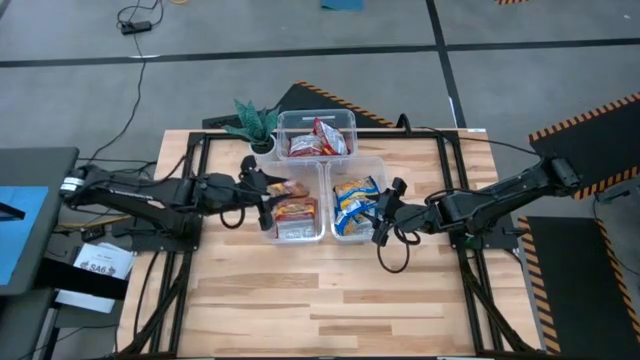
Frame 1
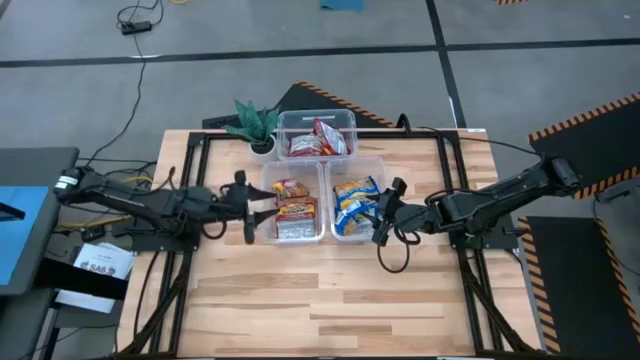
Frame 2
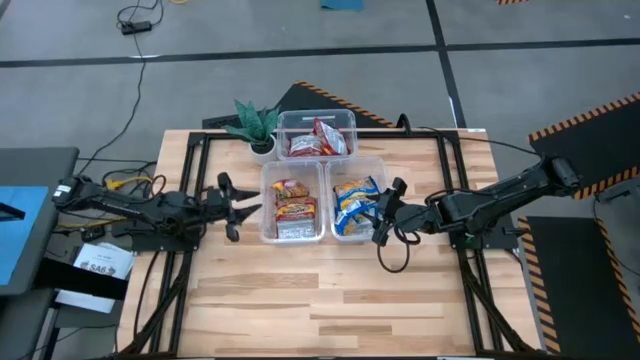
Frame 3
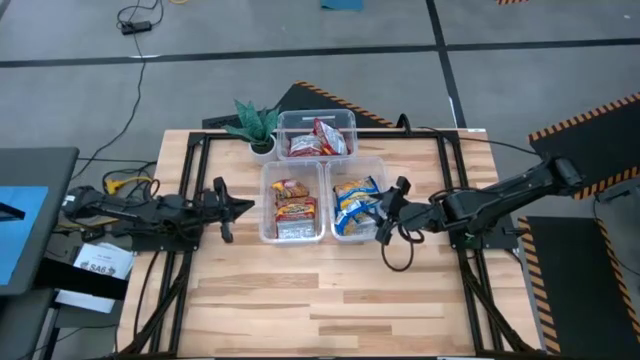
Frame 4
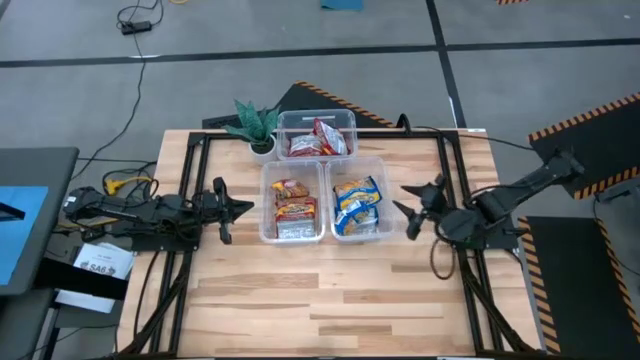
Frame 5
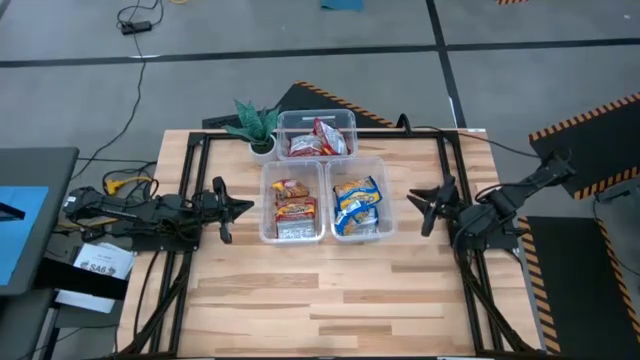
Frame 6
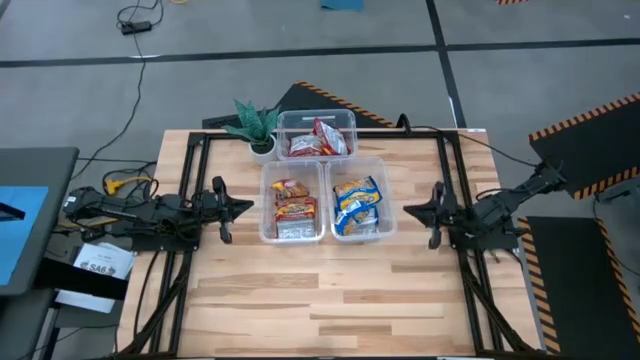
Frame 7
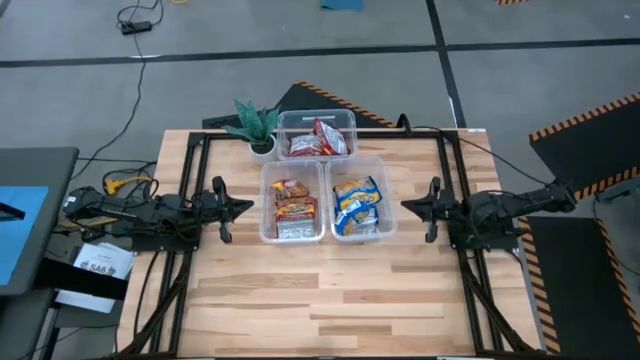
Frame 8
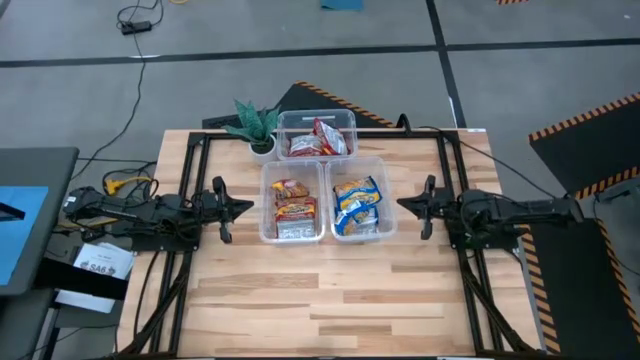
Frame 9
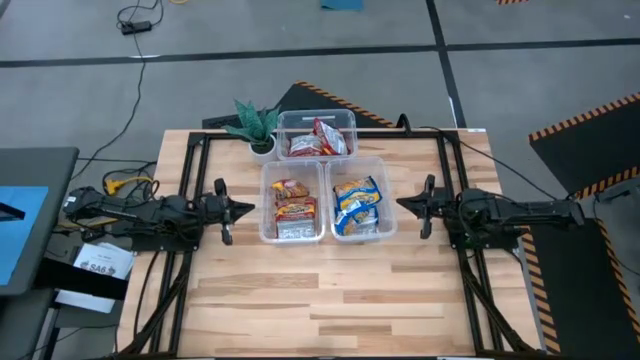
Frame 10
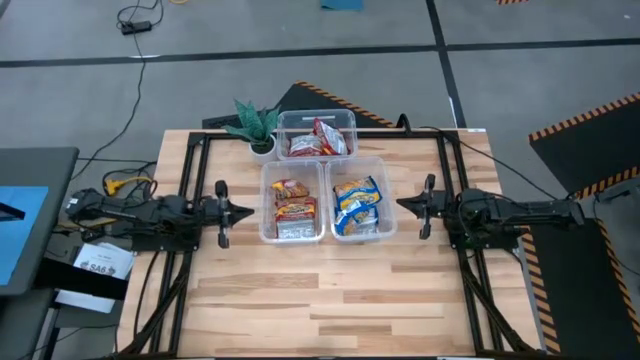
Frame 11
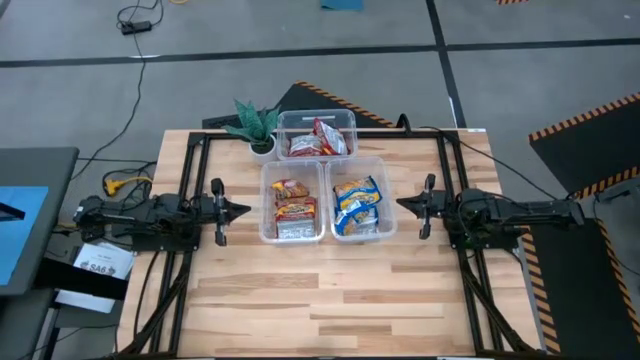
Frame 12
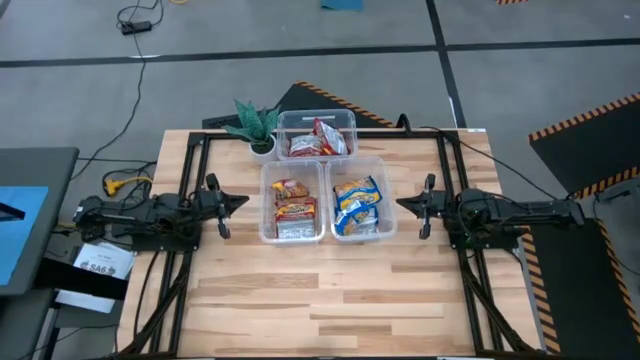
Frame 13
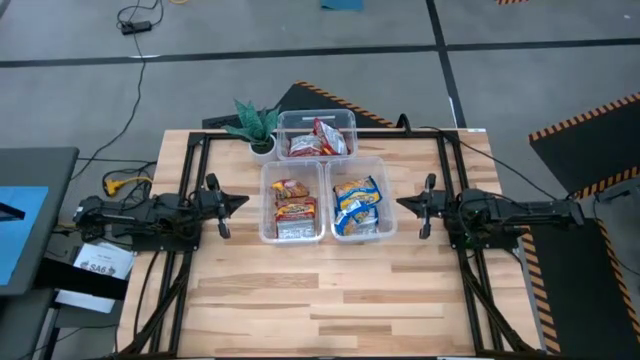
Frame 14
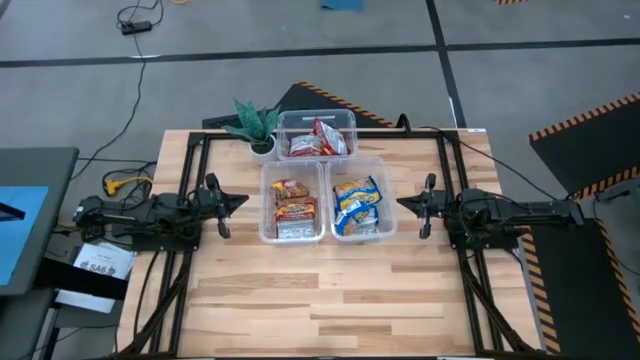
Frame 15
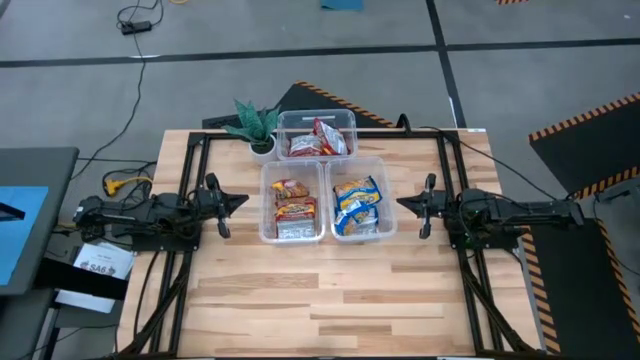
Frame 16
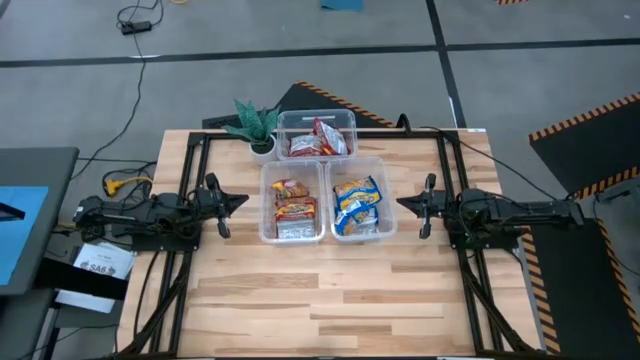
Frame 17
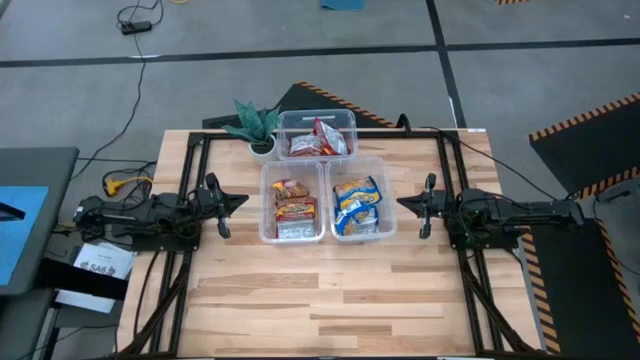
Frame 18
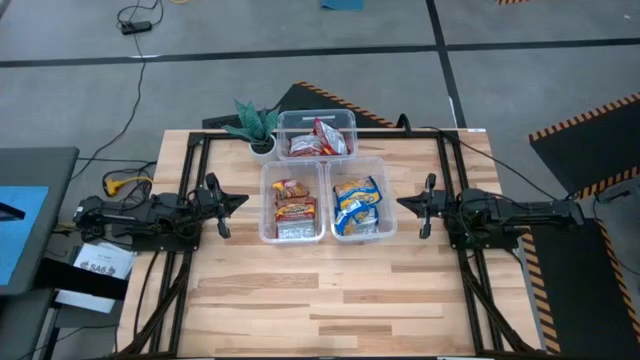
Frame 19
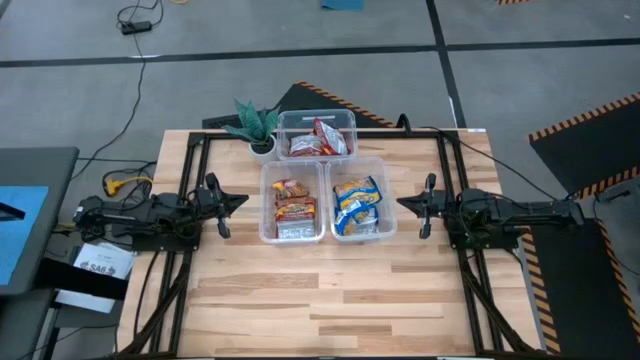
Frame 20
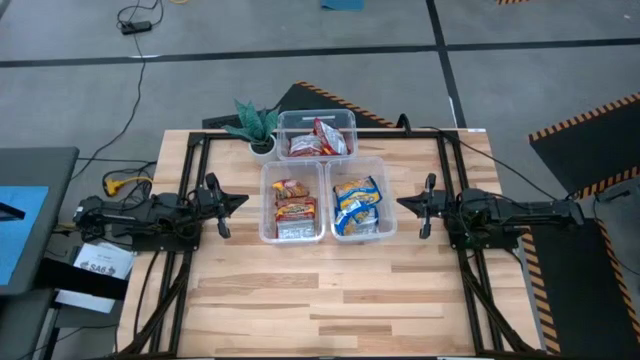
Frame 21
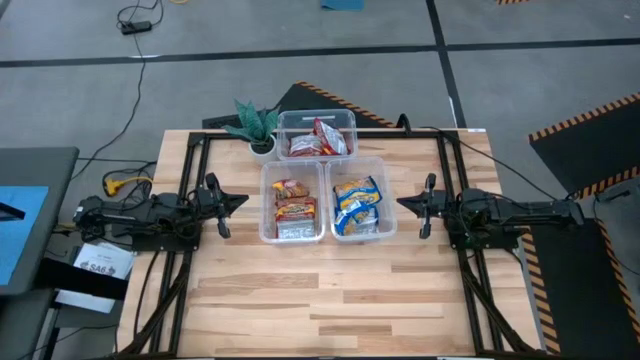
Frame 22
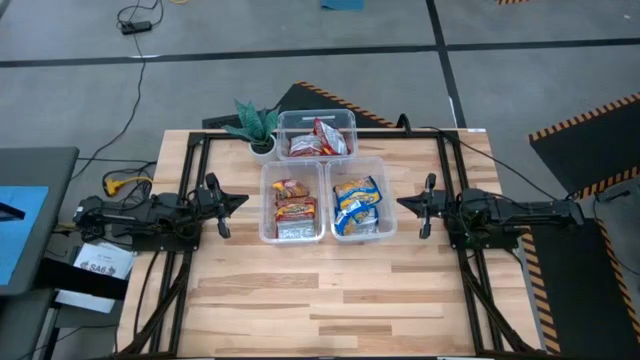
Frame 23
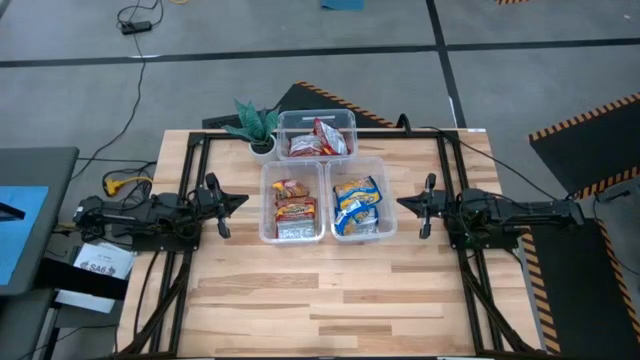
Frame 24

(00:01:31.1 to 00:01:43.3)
Task: Sort Maruchan noodles
Return to Home Position

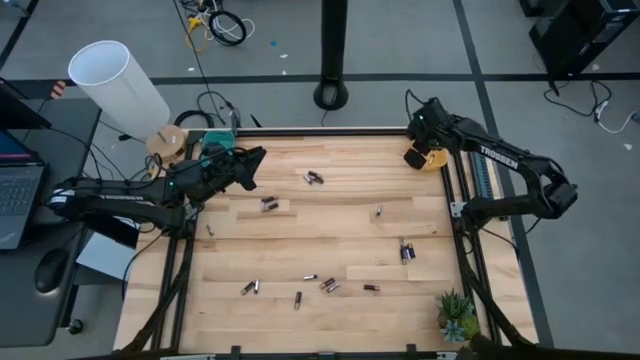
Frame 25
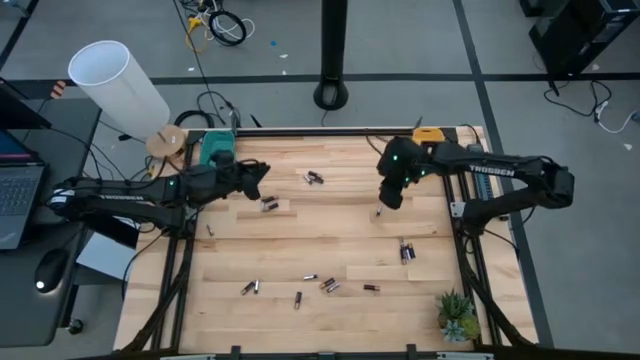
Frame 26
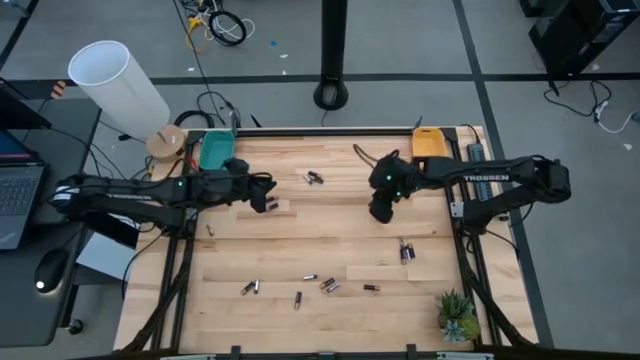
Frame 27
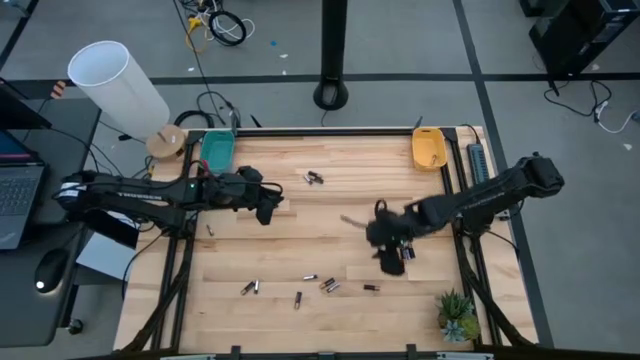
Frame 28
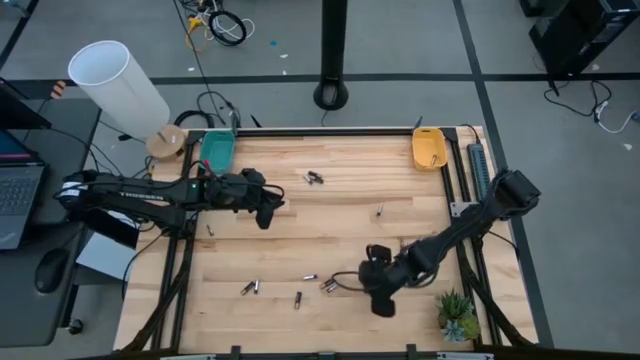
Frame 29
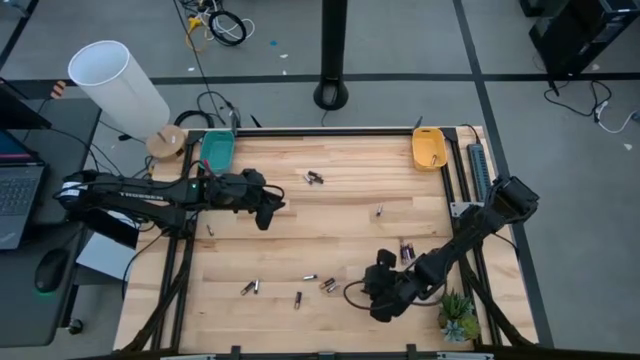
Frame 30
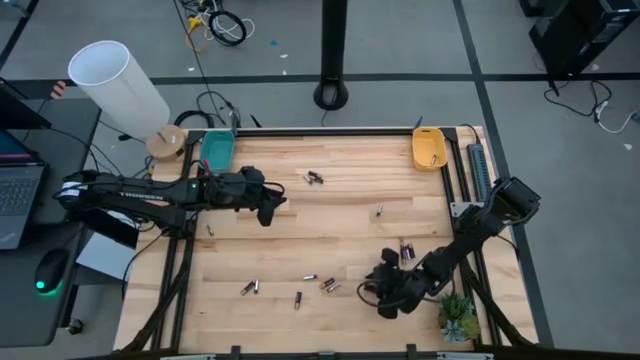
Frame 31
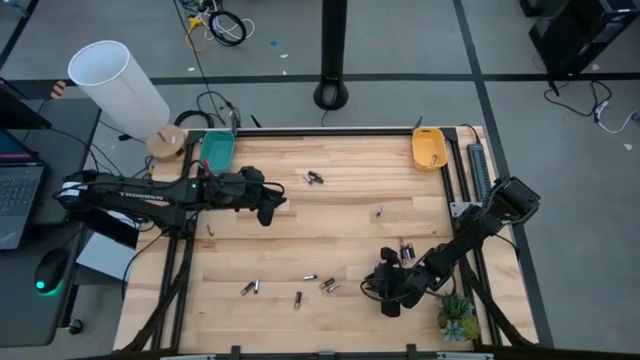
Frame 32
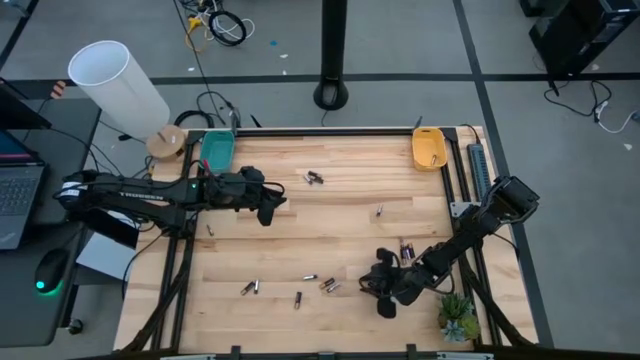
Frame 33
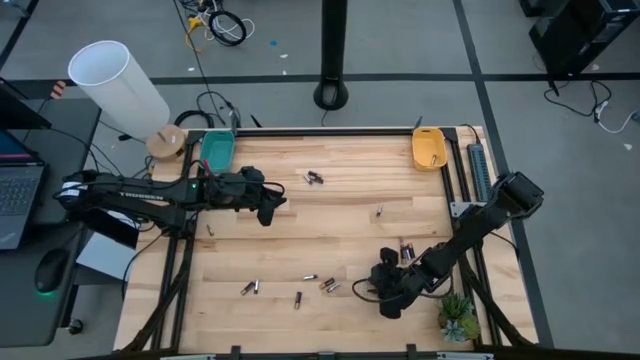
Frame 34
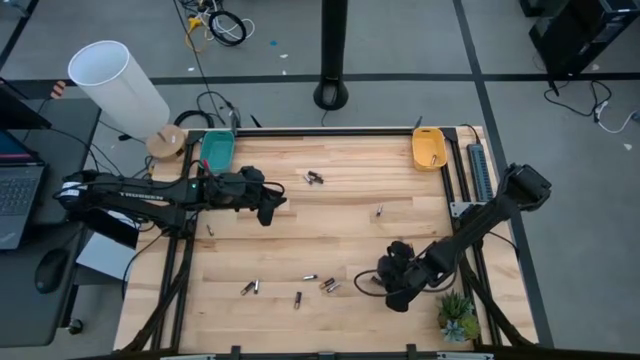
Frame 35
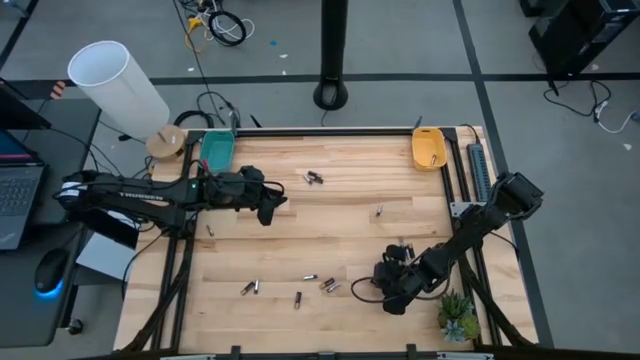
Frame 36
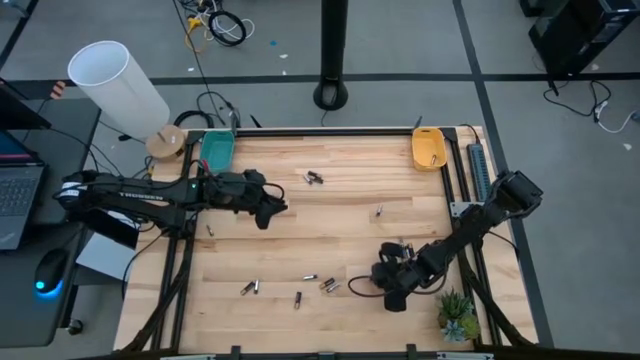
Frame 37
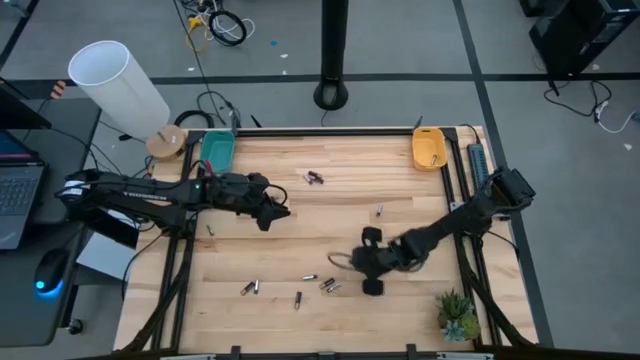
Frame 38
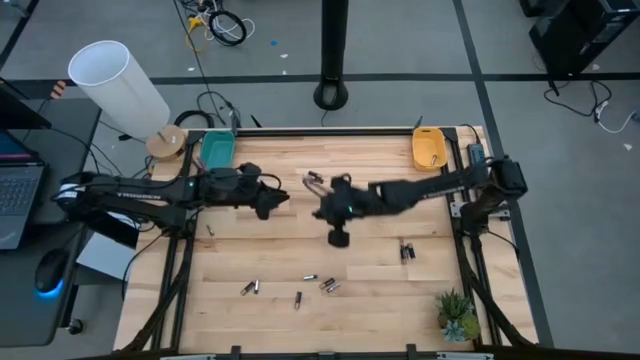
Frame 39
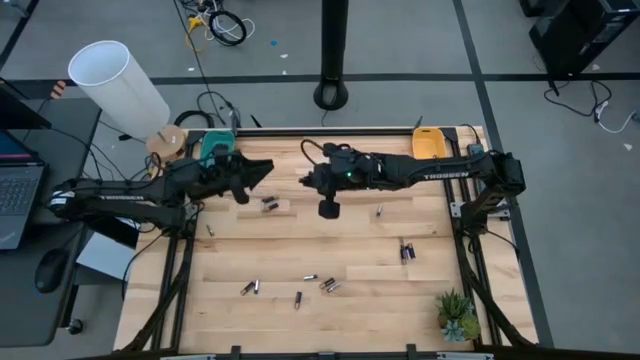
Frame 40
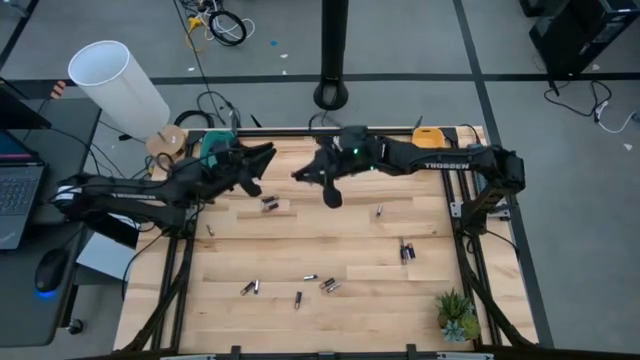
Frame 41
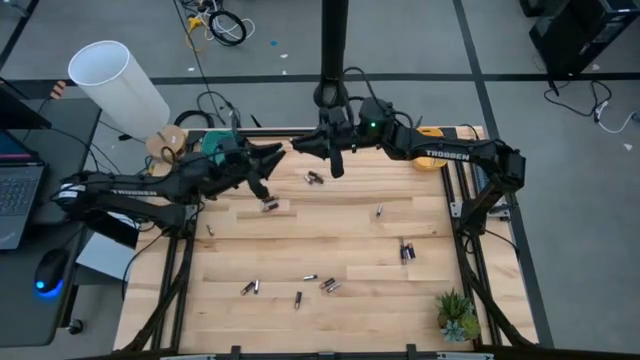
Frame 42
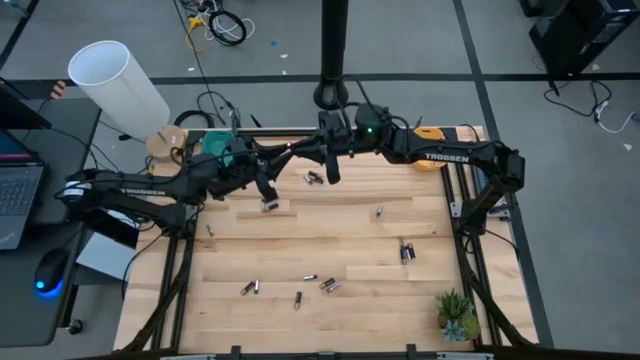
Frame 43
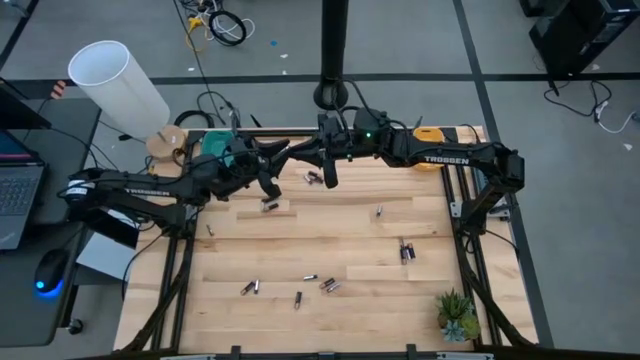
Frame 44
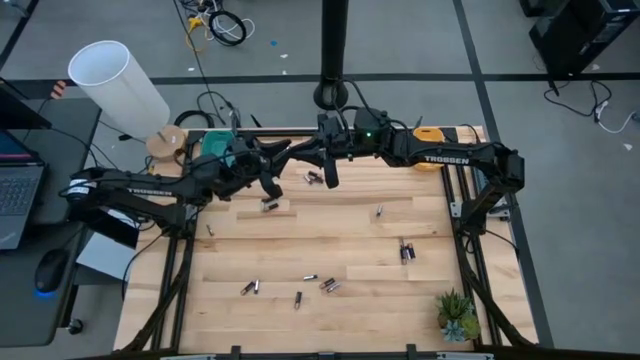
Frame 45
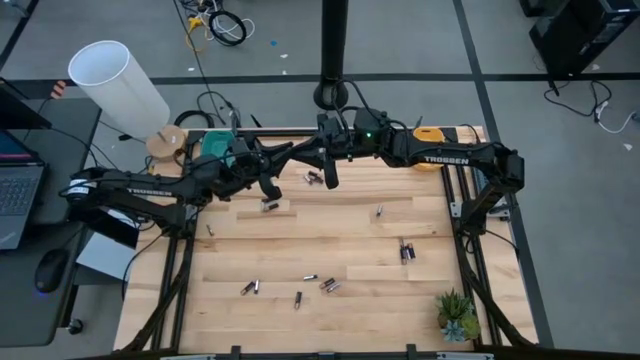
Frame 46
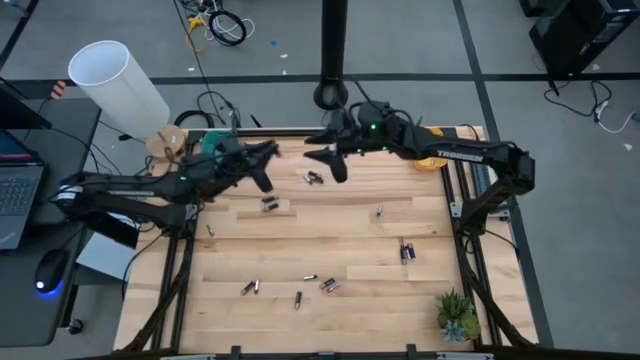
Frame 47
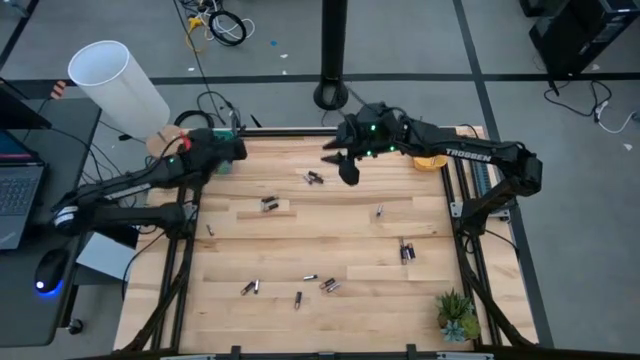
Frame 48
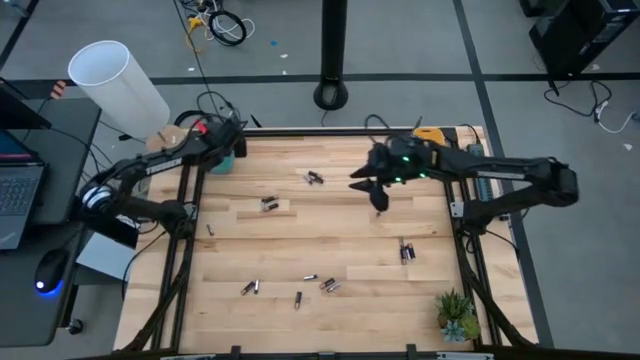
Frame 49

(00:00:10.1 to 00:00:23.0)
Task: Sort batteries
Put the black battery into the blue bin
